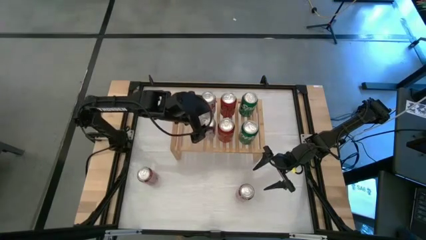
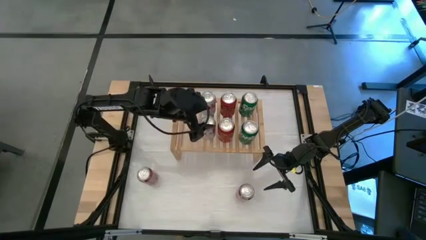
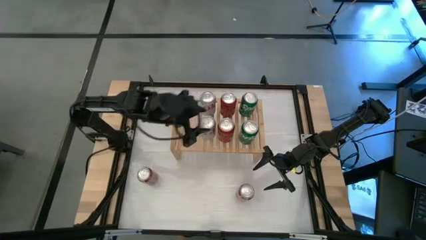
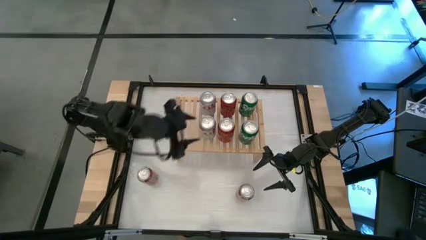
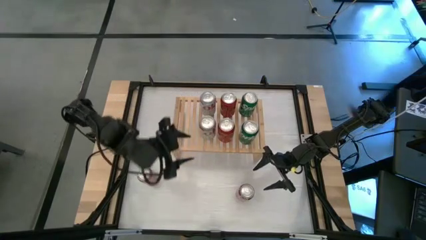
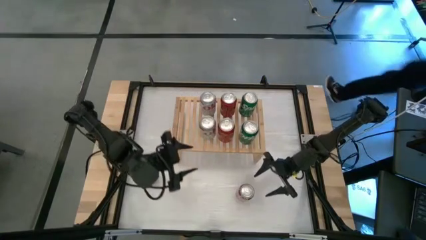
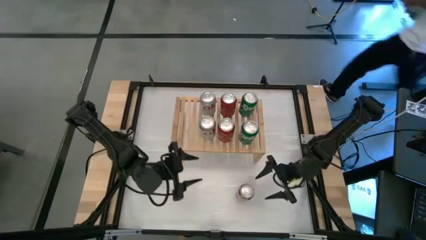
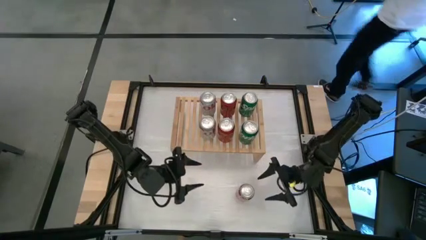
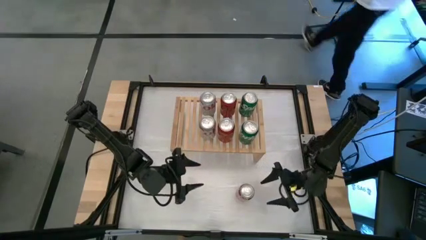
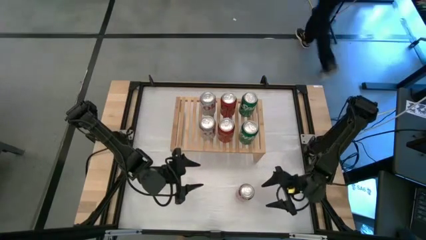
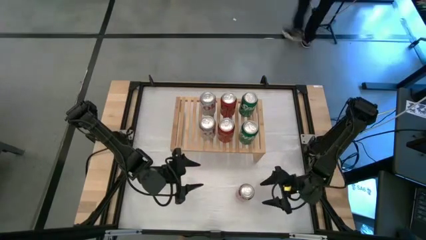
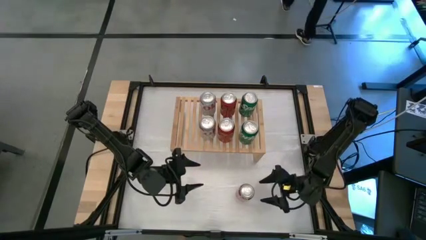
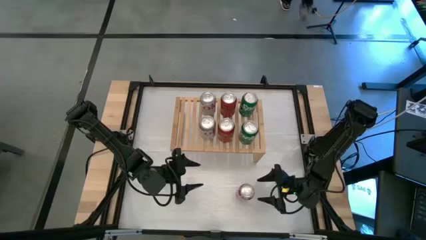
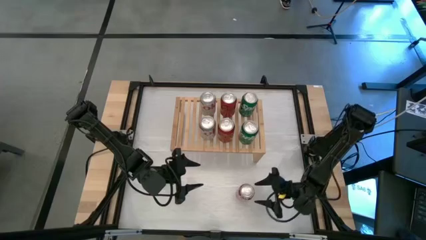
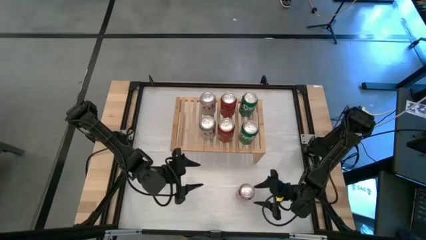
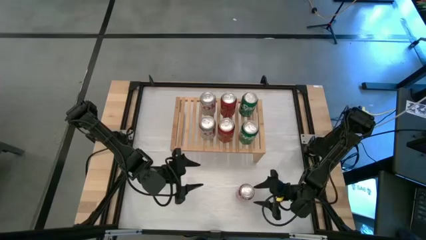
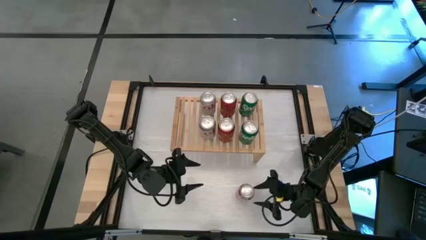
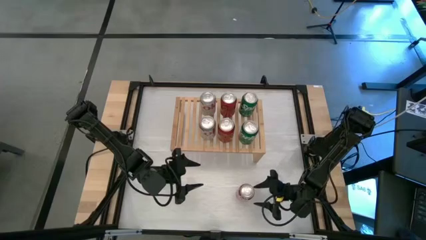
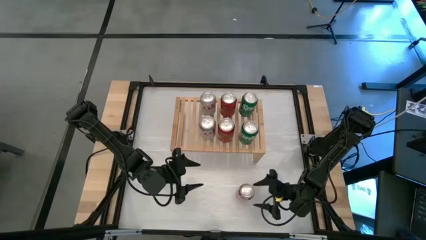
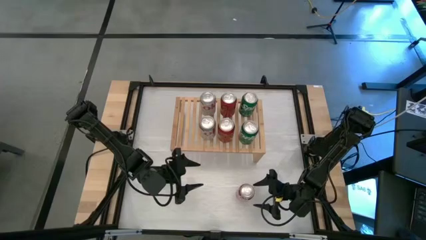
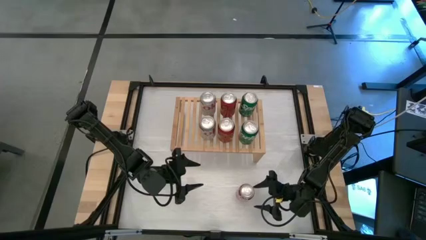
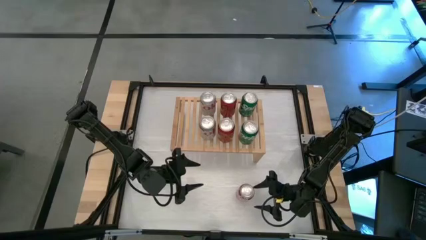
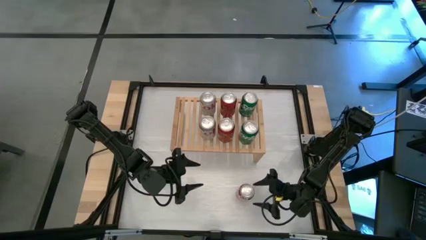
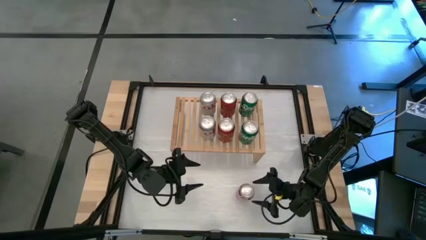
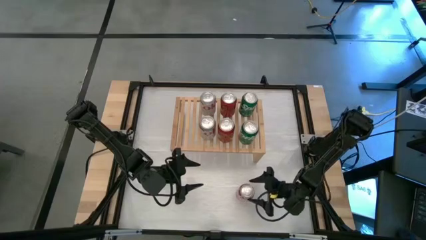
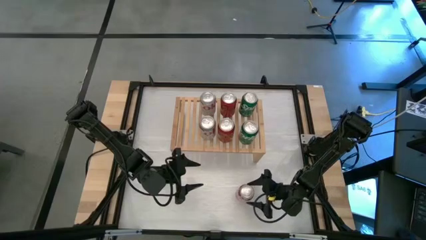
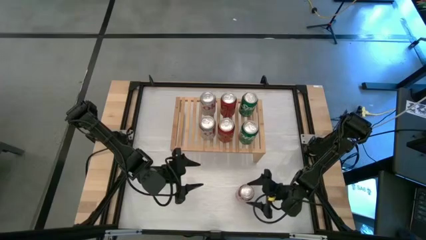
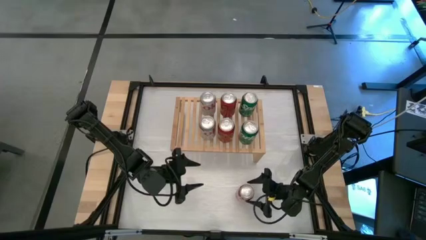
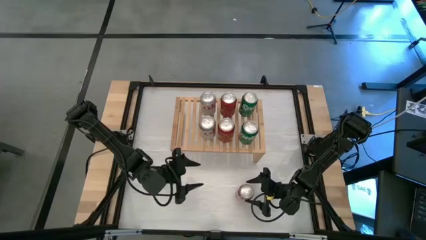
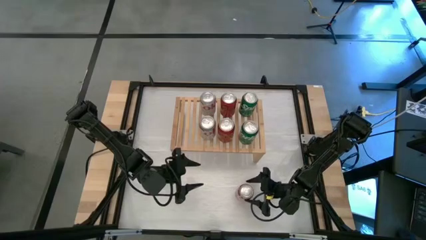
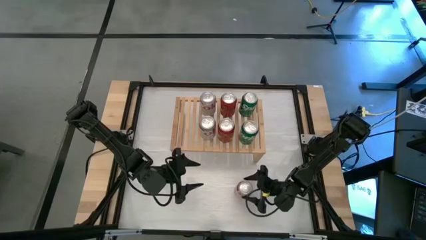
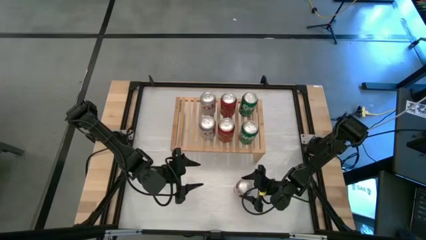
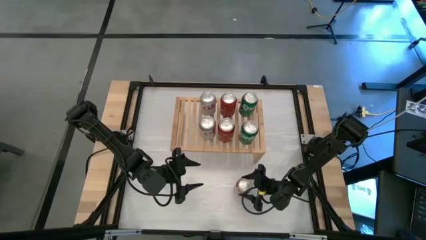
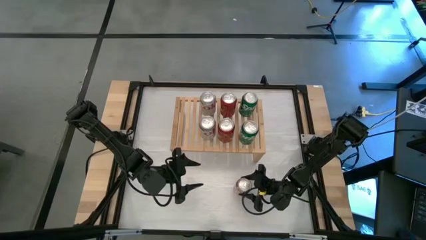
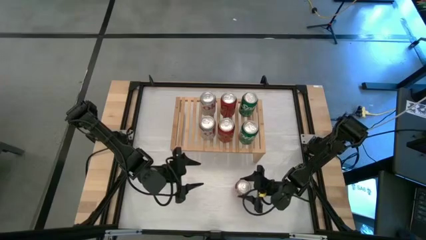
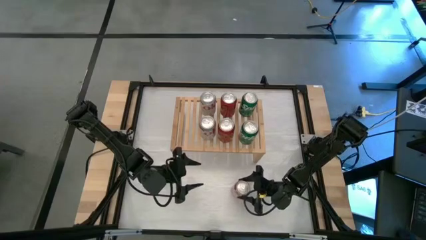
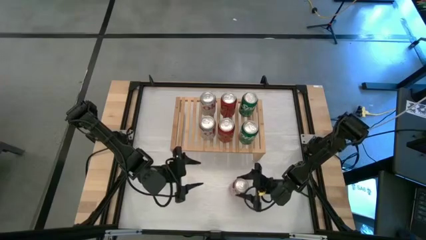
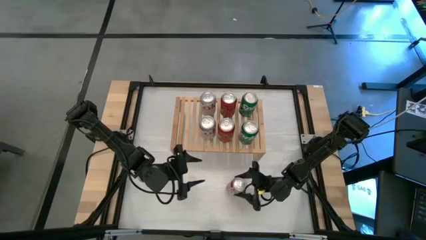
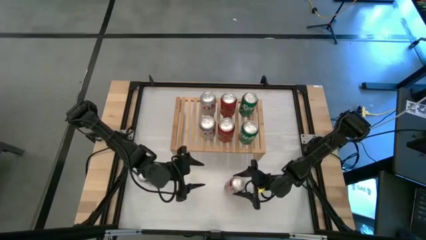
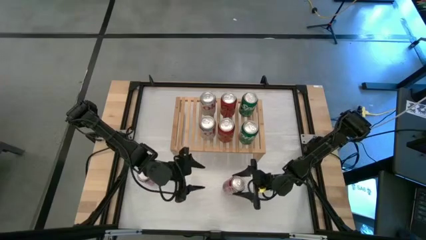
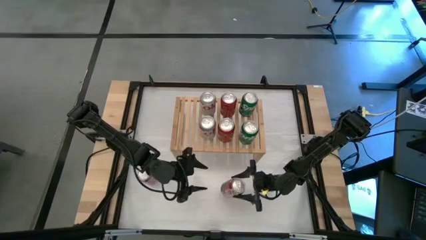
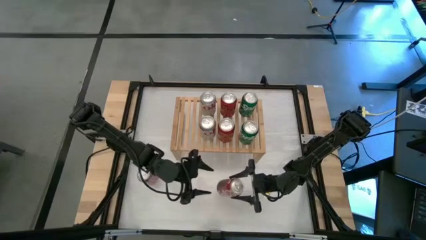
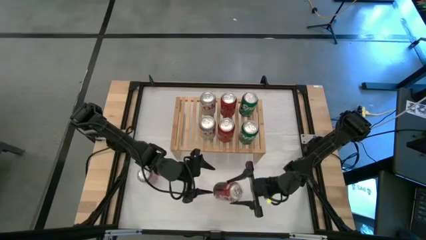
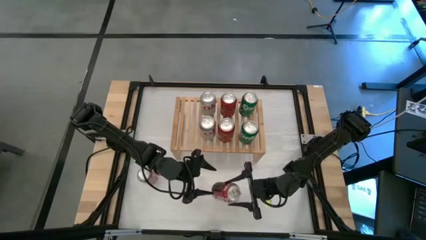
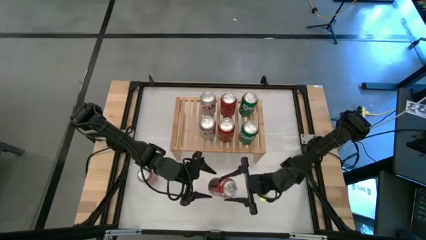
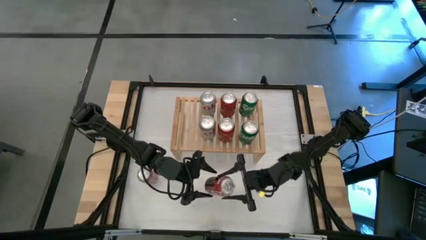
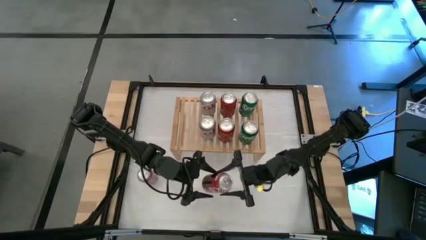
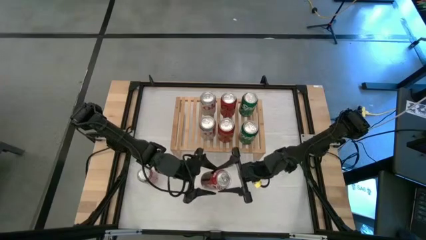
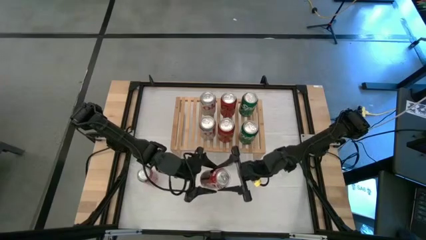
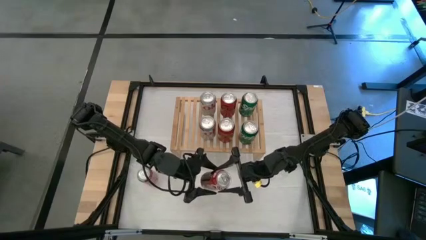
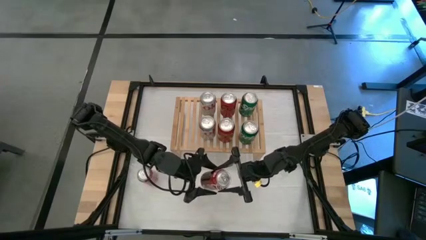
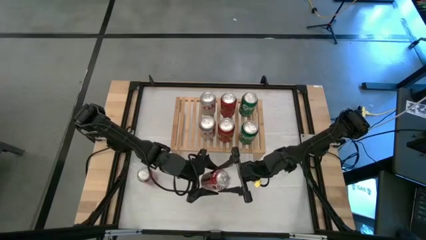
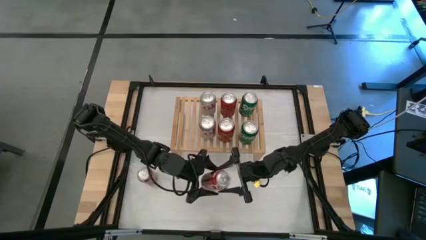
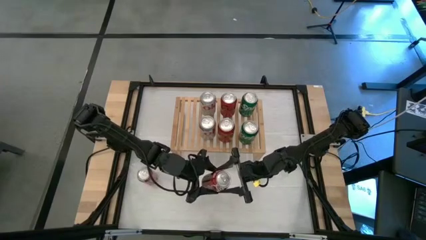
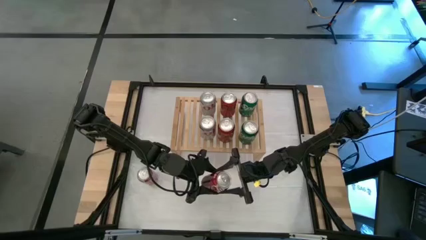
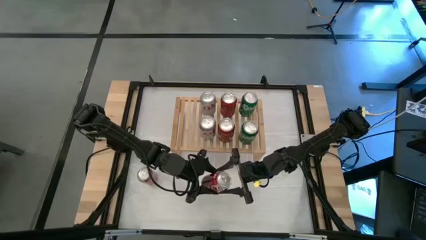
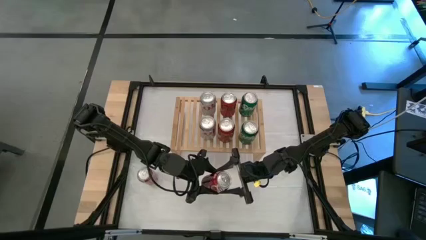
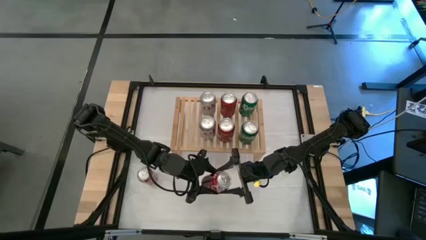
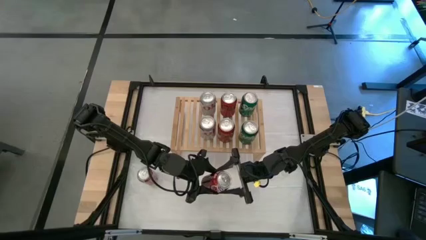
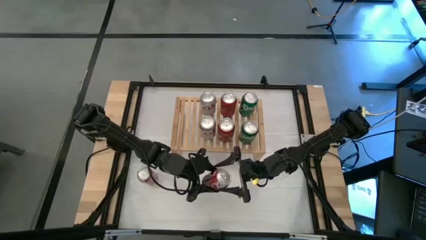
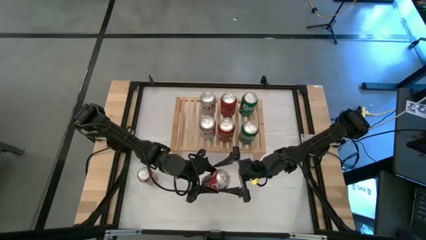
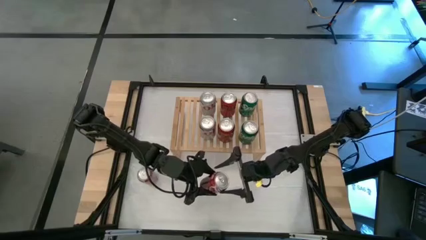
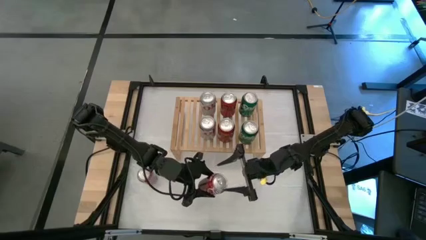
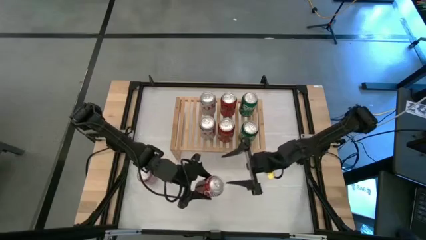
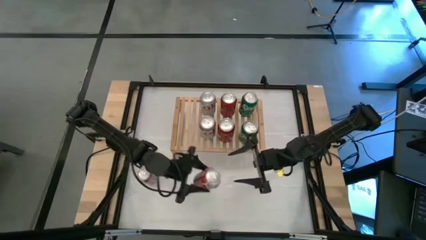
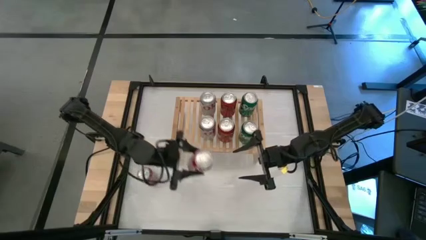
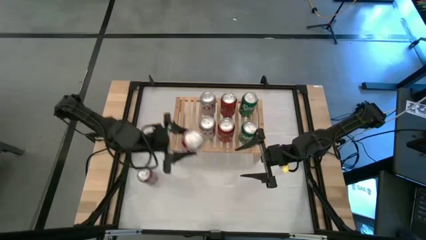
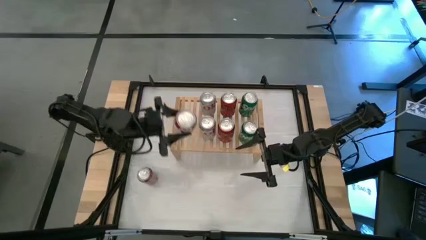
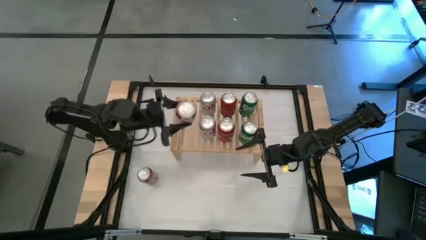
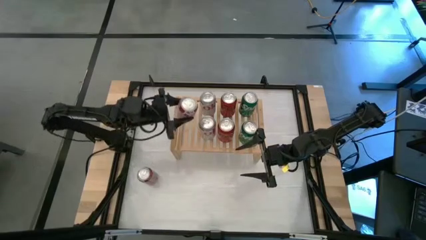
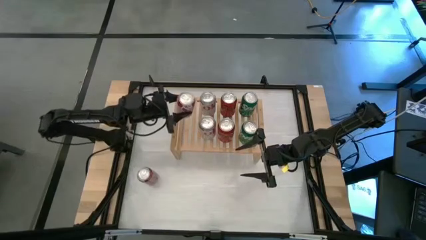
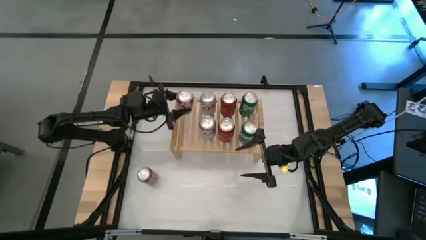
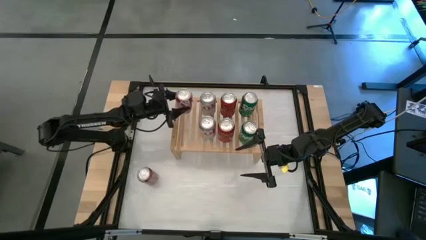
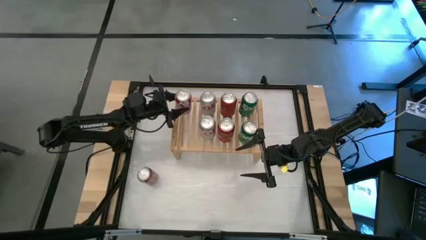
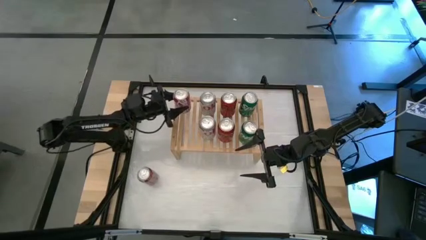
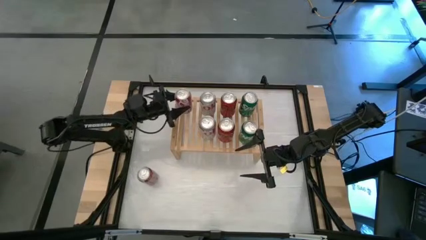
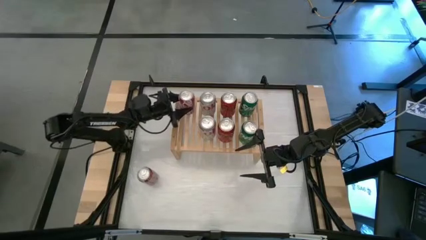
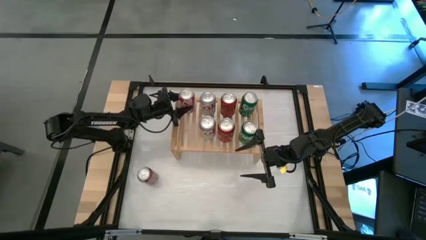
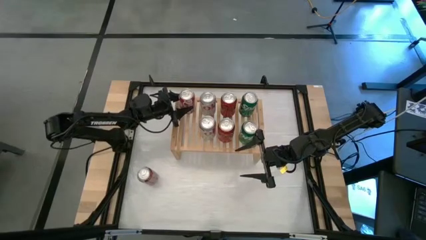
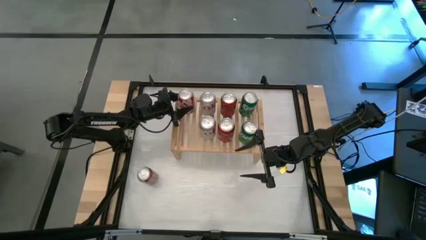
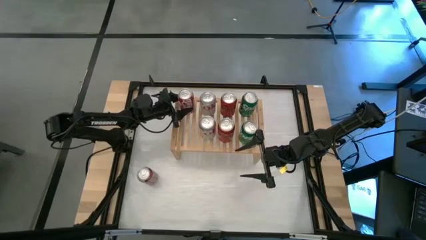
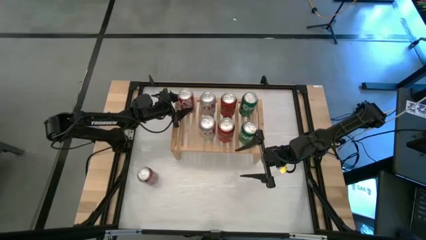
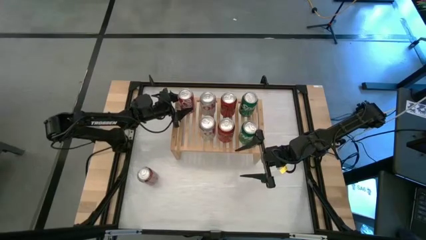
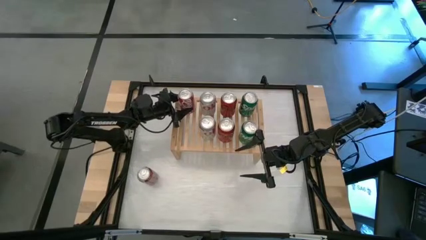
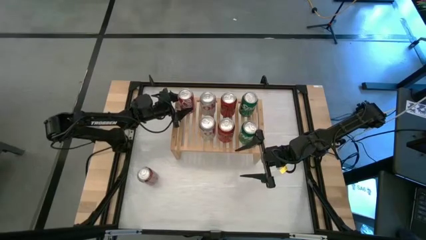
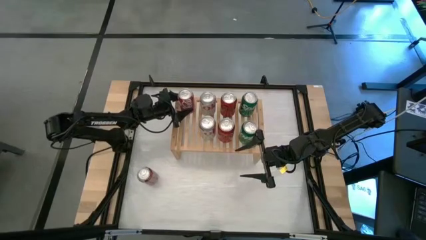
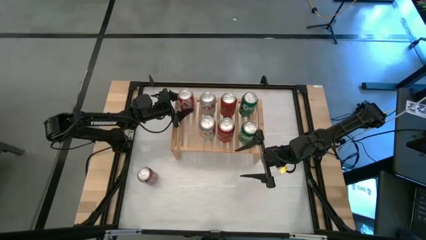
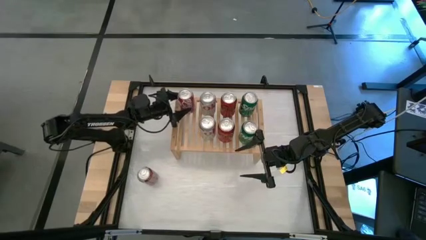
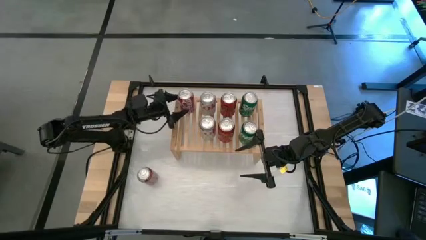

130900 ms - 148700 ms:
Task: Place canned beverage on shelf
Put the right red white soda can on the shelf
